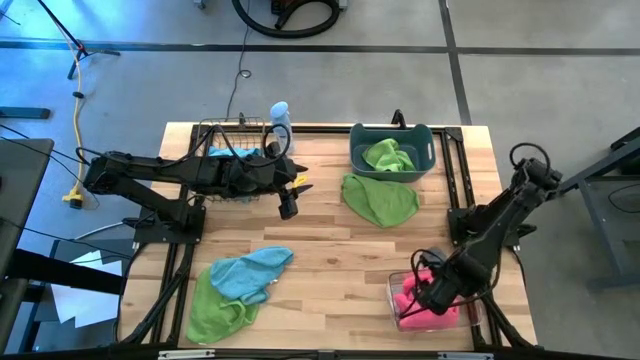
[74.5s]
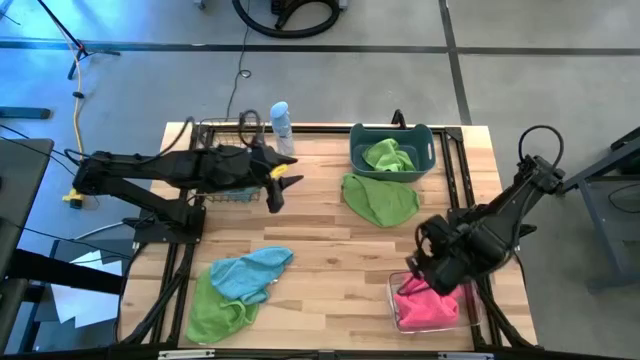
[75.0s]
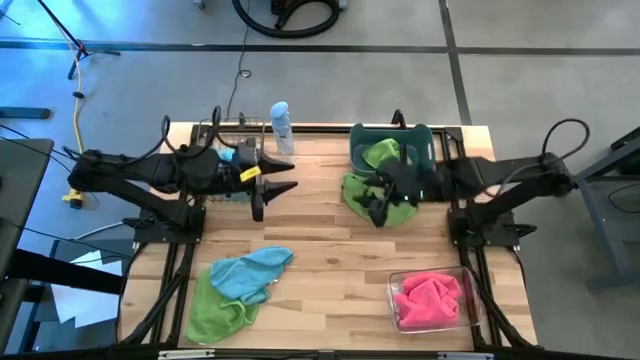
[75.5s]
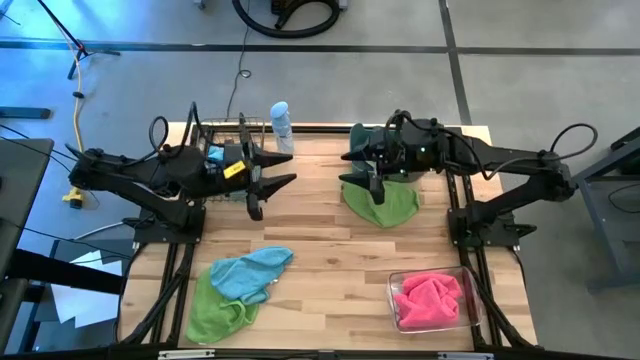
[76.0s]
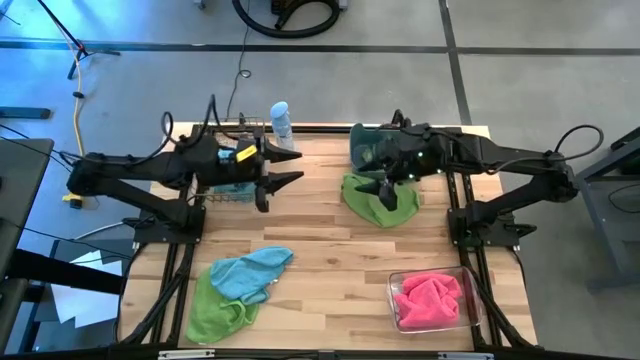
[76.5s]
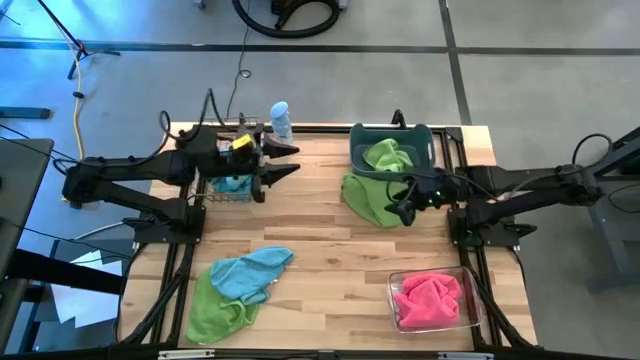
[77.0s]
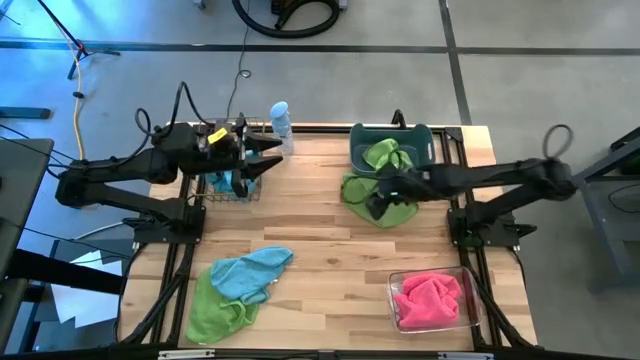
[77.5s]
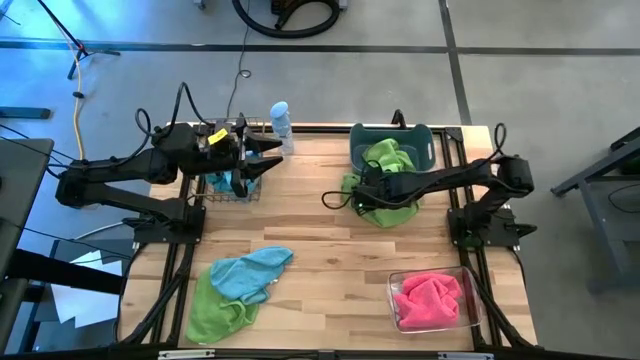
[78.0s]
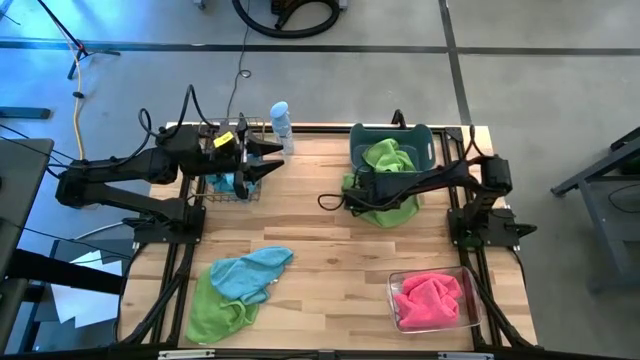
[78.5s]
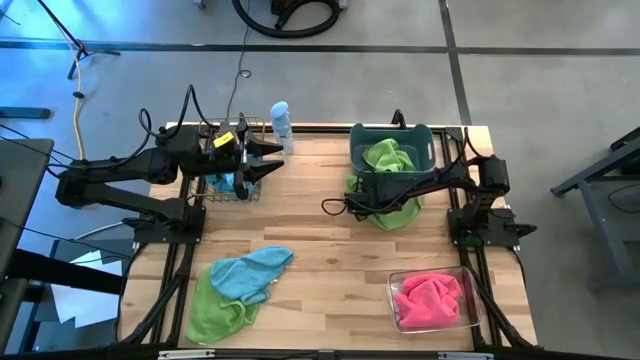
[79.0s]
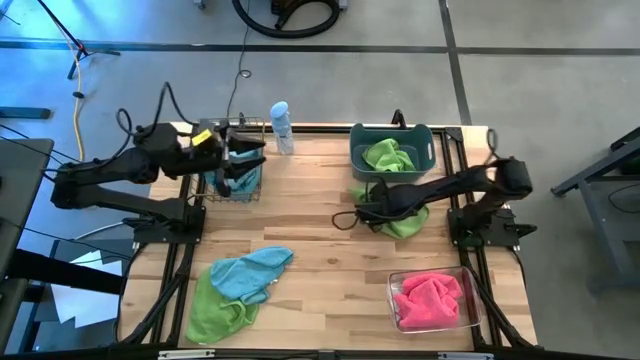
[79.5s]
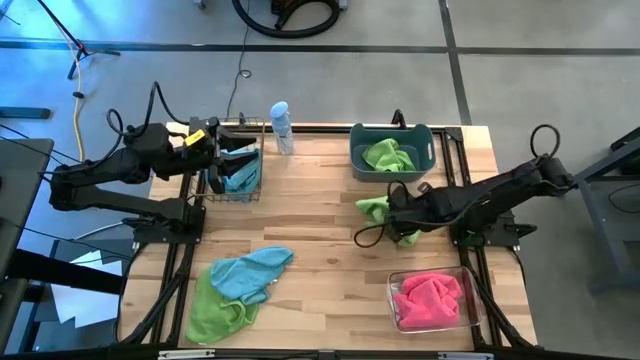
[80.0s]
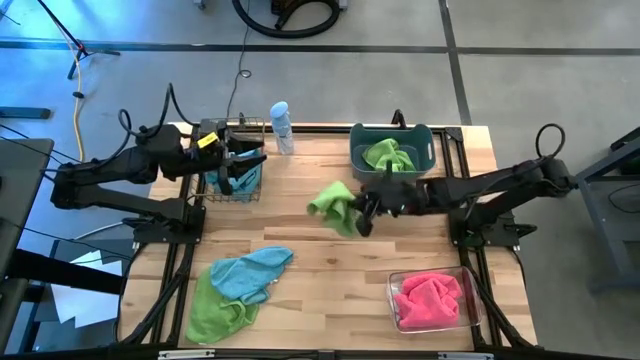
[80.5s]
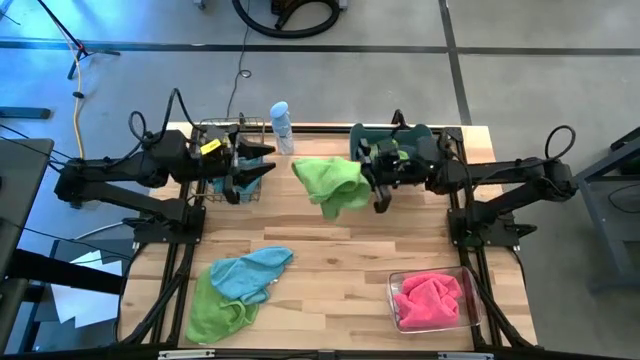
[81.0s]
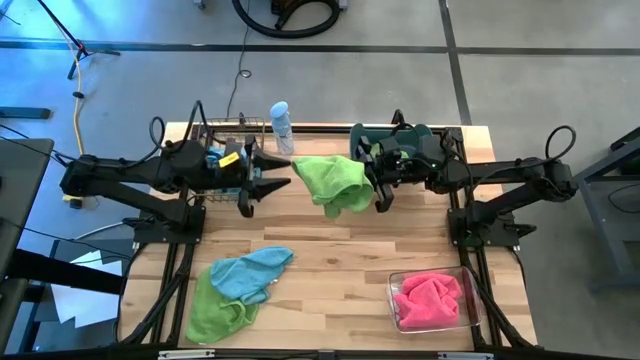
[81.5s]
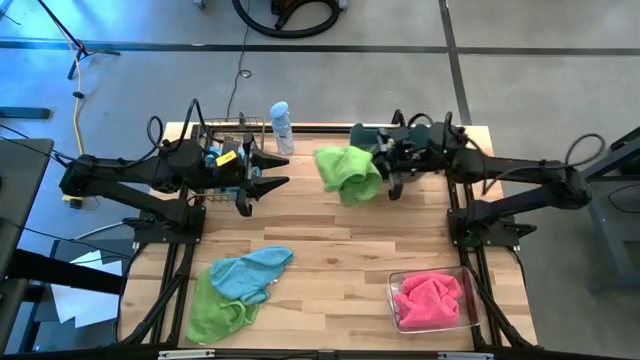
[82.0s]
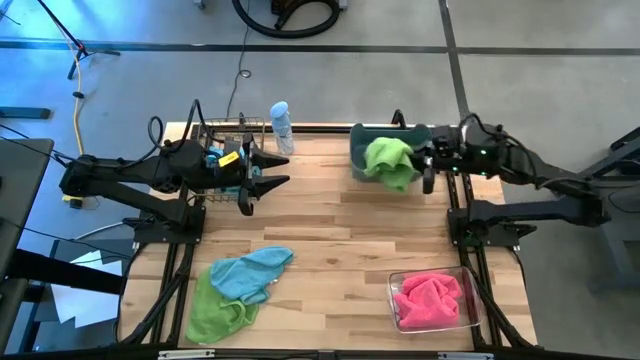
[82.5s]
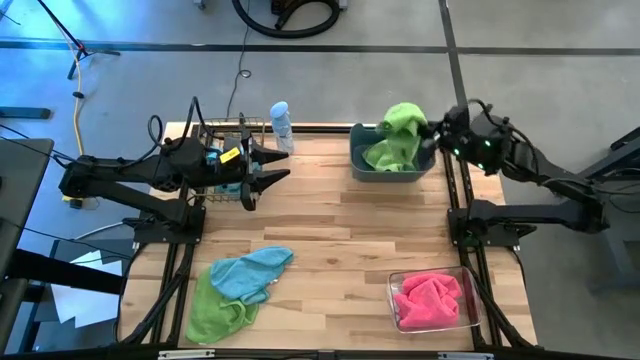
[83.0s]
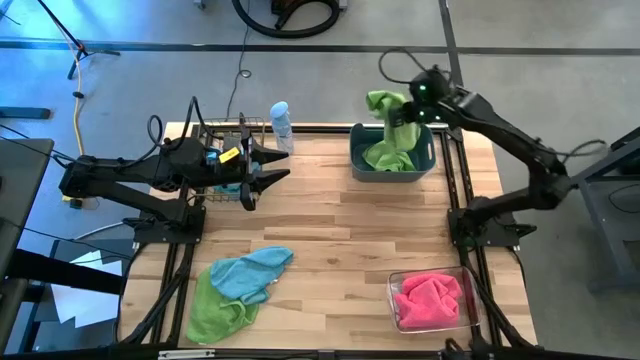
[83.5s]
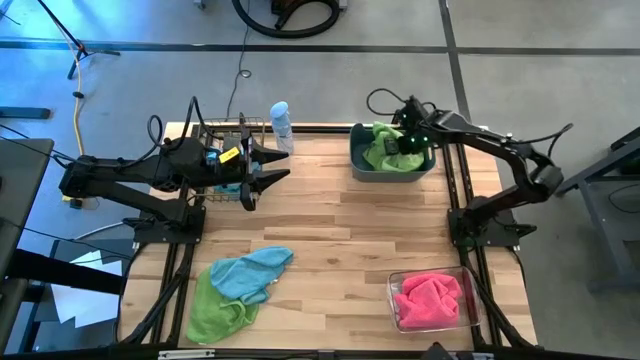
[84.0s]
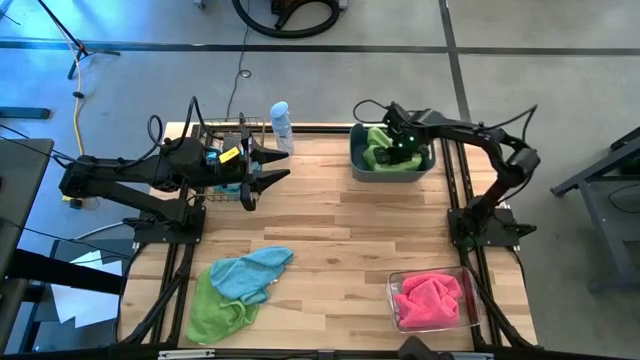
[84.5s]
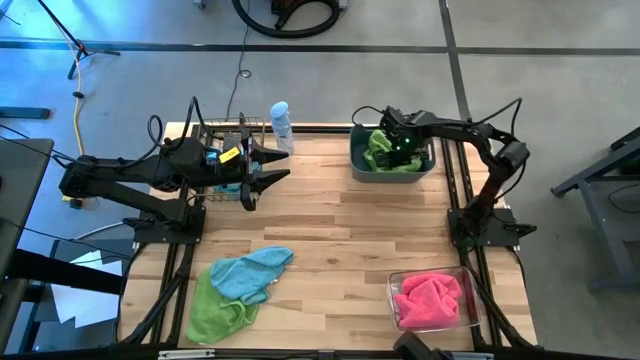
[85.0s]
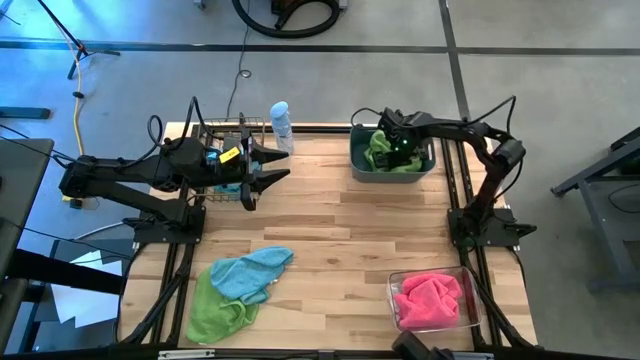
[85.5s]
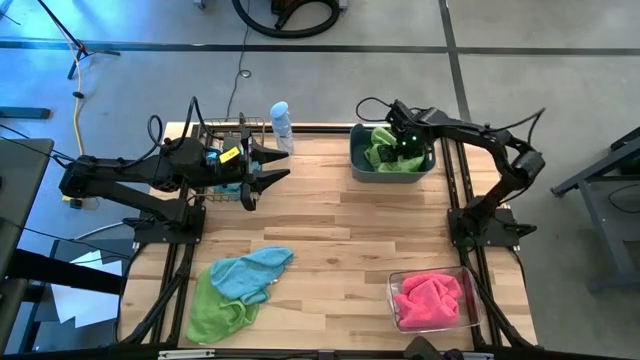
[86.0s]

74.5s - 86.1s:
Task: Sort microfiber towel by color & place in baskets
Put the top green towel into the blue bin

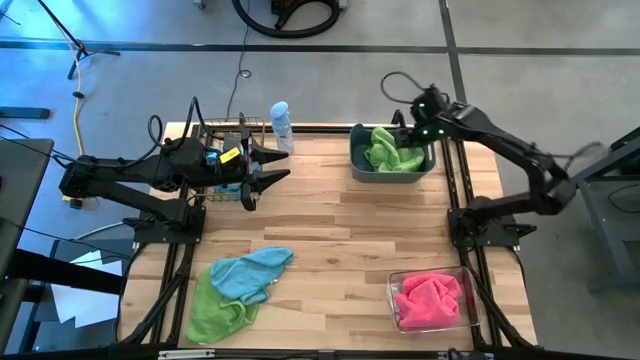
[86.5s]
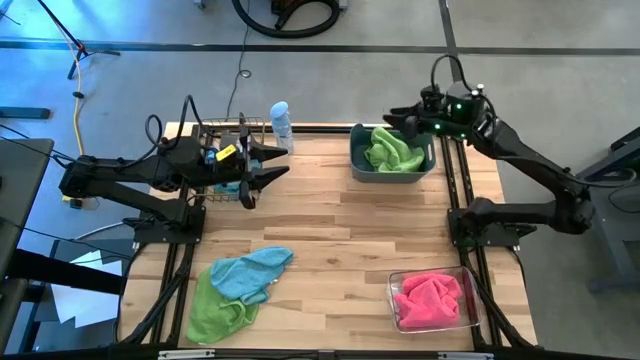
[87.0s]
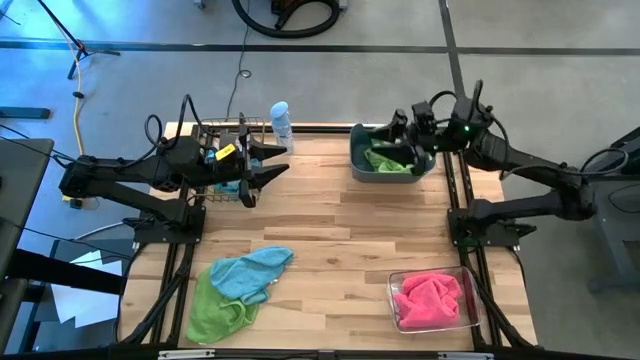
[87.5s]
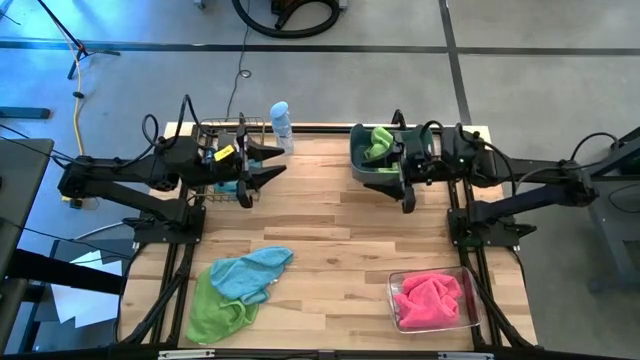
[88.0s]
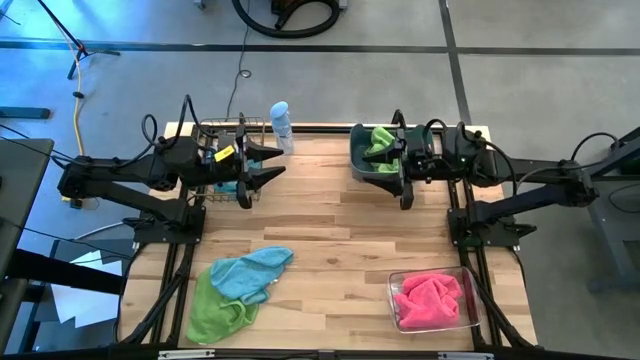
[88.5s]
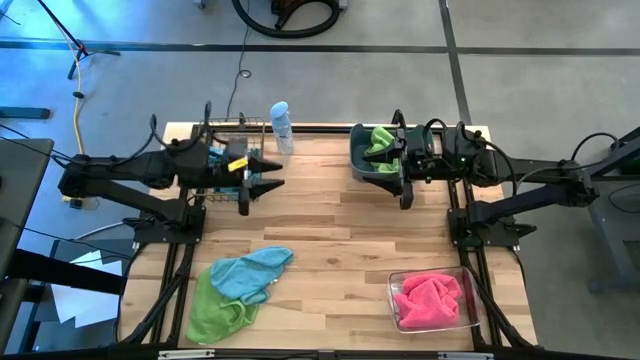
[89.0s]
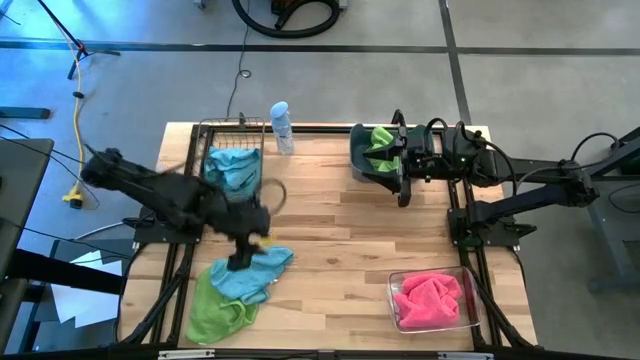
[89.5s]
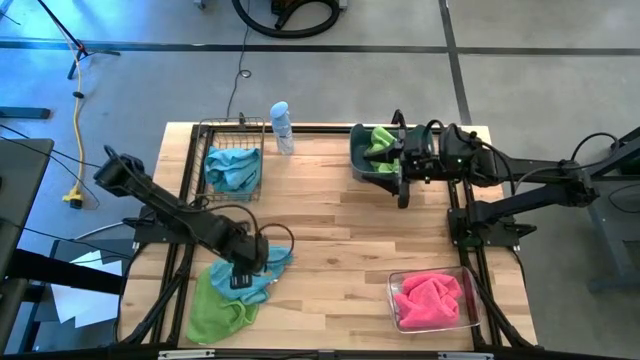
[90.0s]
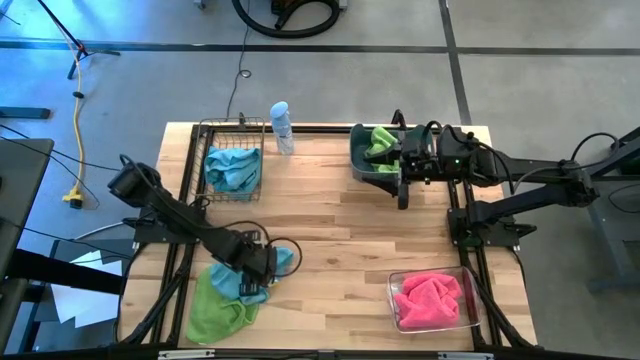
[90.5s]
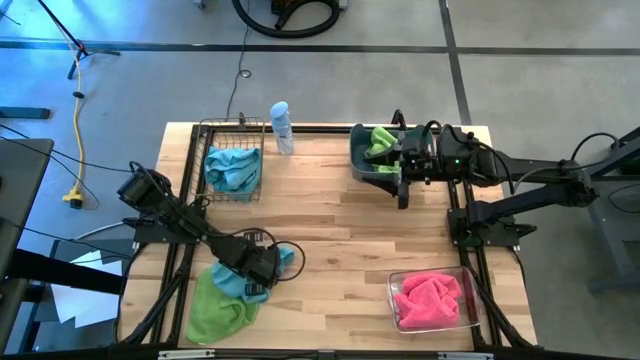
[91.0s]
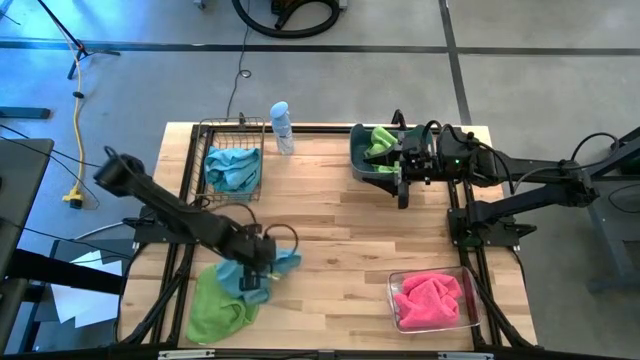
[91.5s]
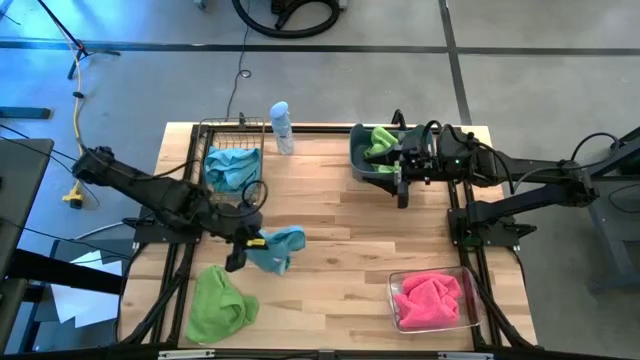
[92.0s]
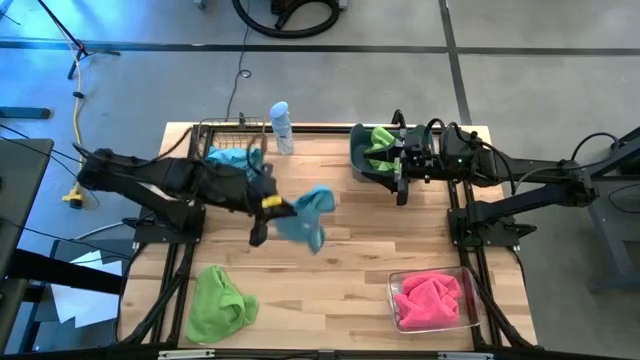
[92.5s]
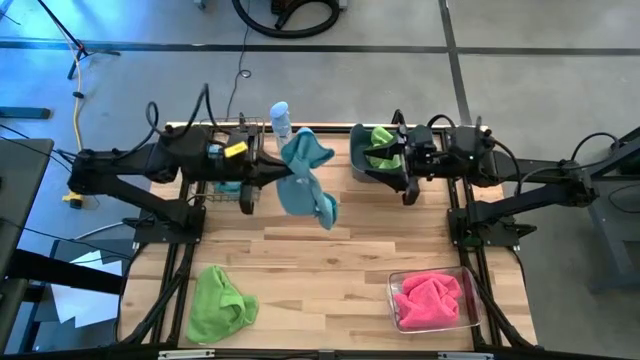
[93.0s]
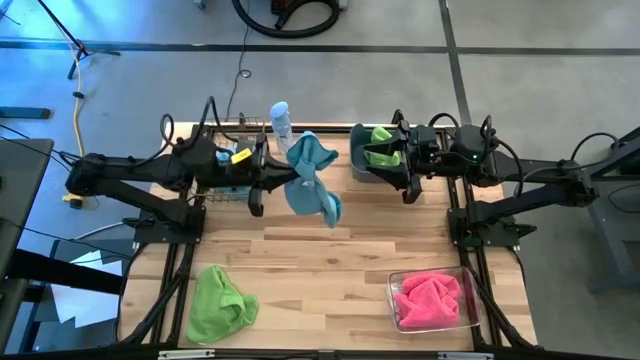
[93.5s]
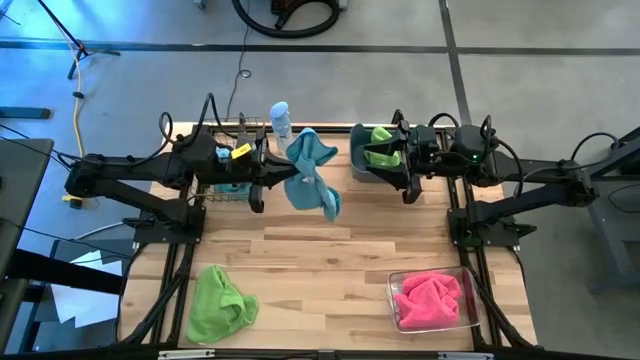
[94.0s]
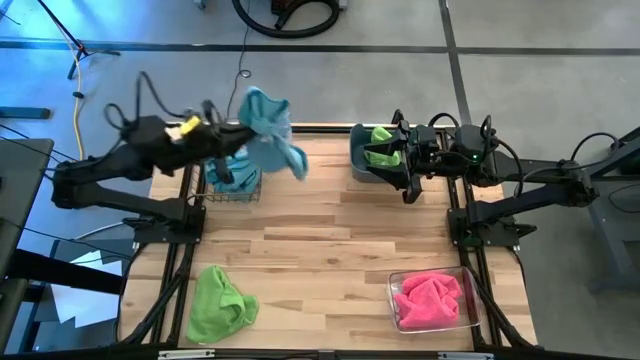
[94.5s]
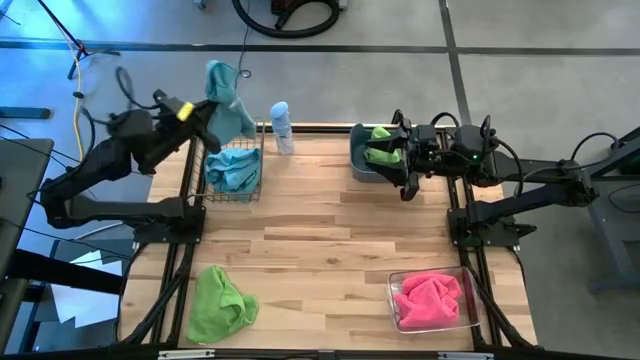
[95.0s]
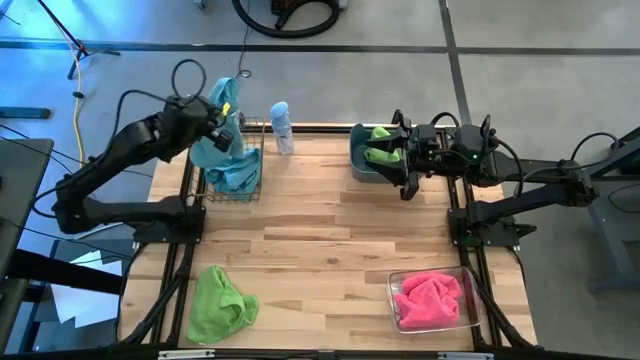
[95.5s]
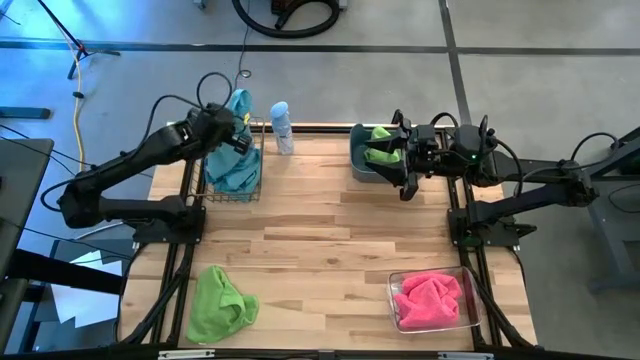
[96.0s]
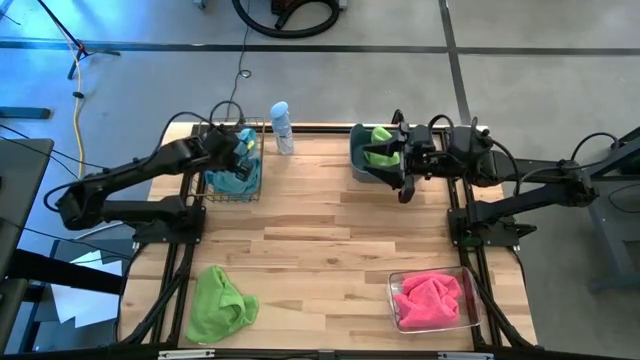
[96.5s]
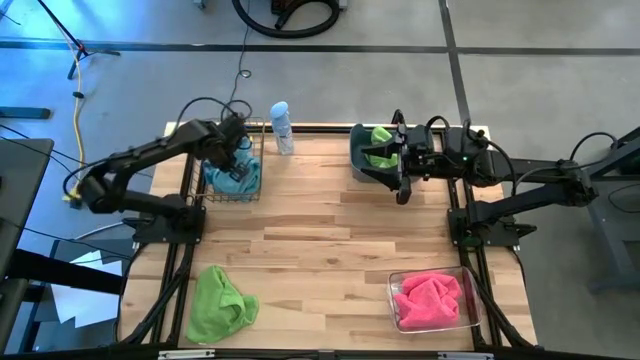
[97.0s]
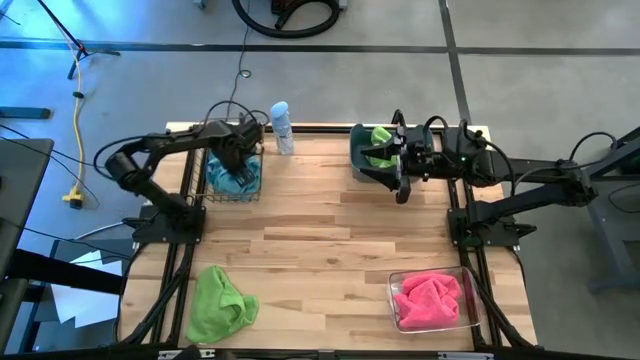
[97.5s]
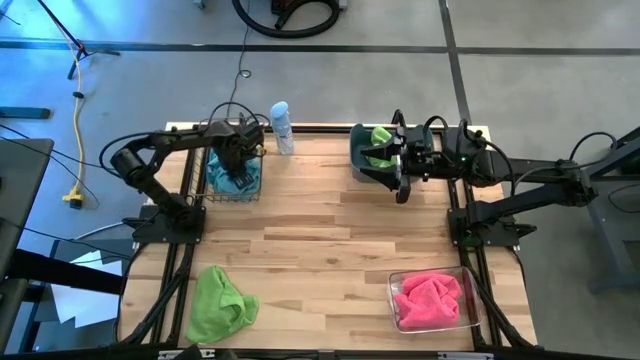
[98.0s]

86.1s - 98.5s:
Put the blue towel into the wire basket
